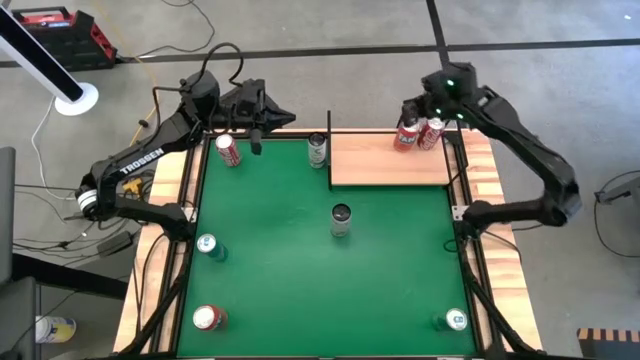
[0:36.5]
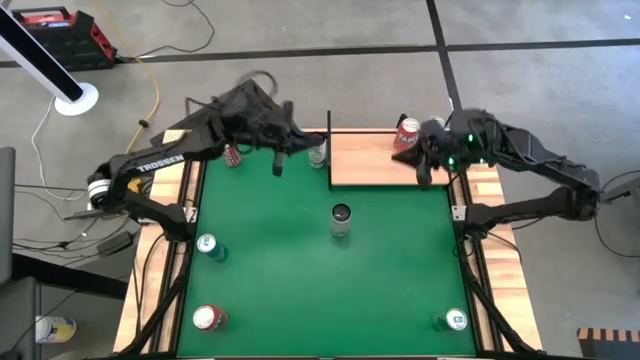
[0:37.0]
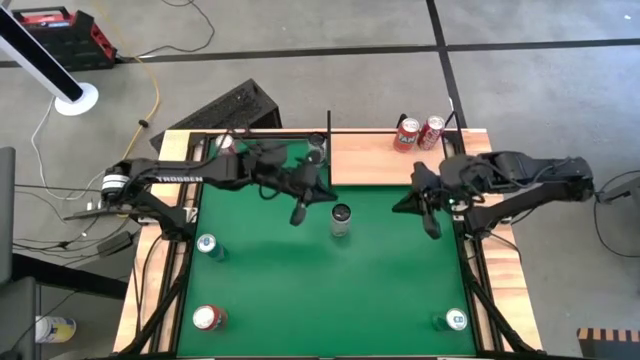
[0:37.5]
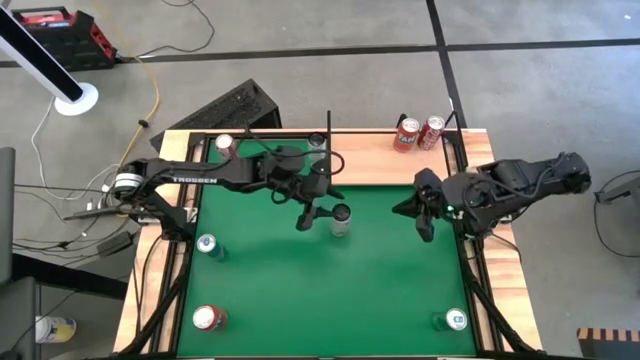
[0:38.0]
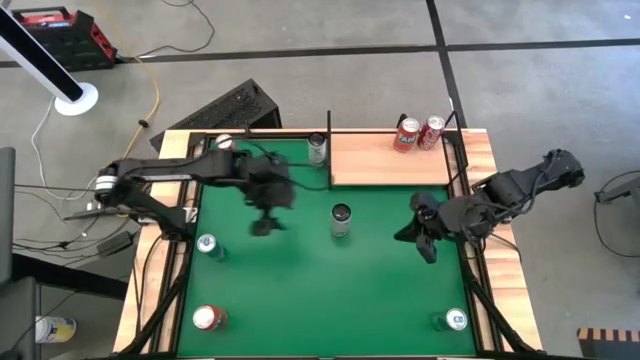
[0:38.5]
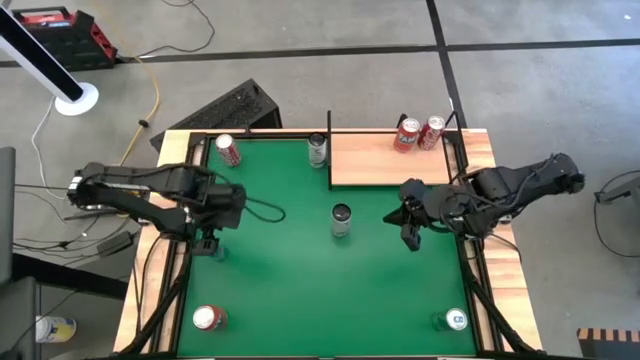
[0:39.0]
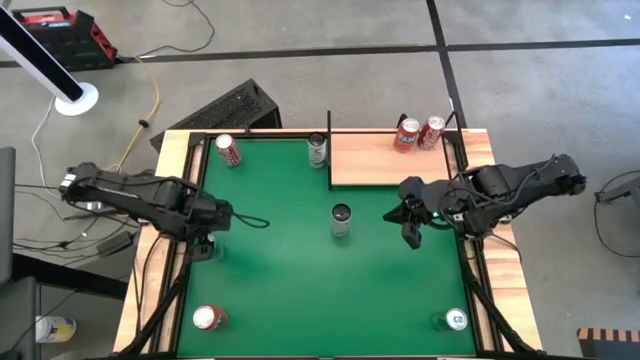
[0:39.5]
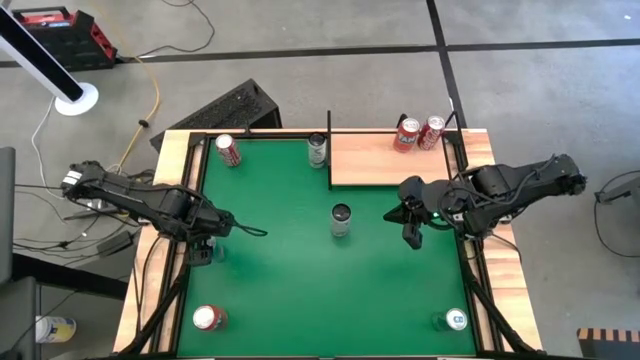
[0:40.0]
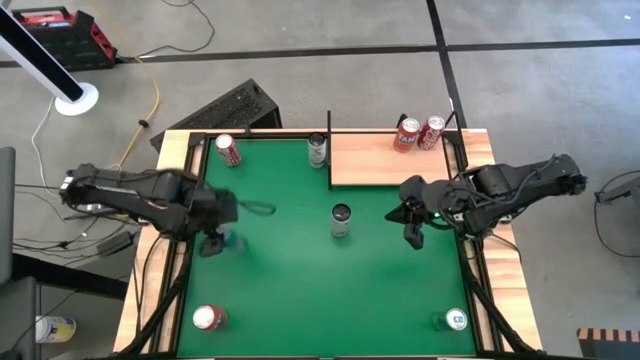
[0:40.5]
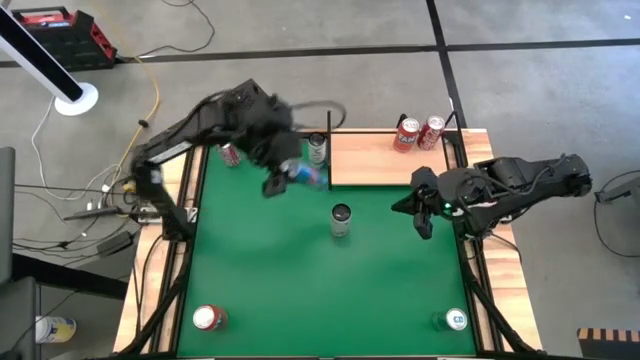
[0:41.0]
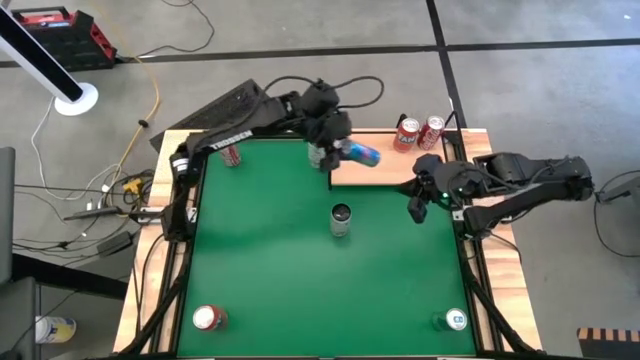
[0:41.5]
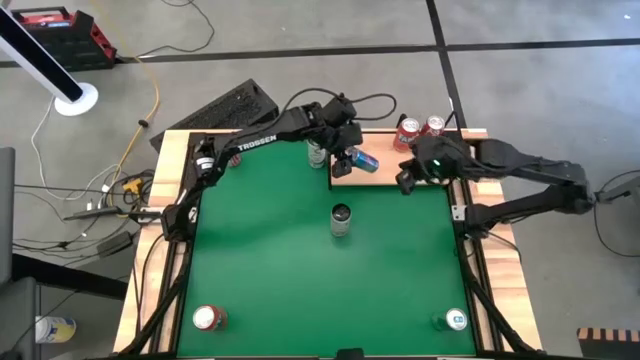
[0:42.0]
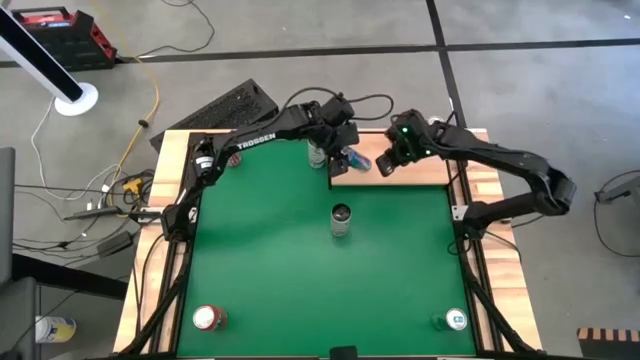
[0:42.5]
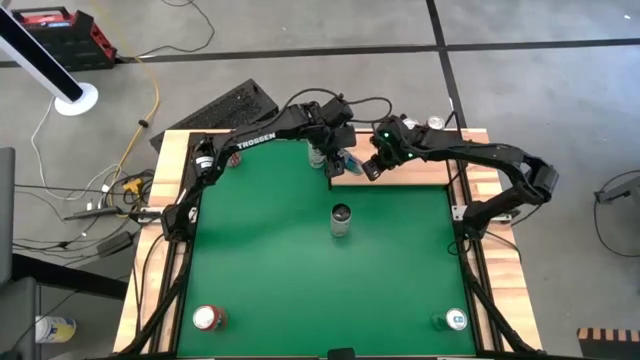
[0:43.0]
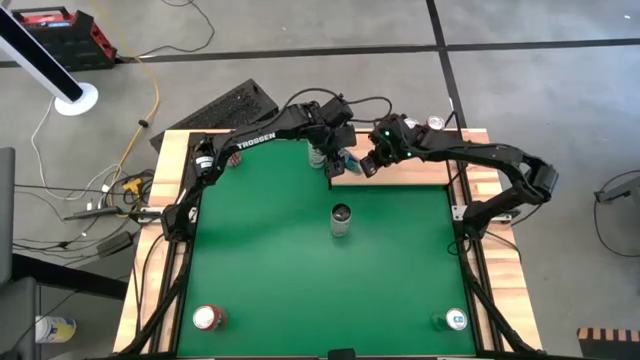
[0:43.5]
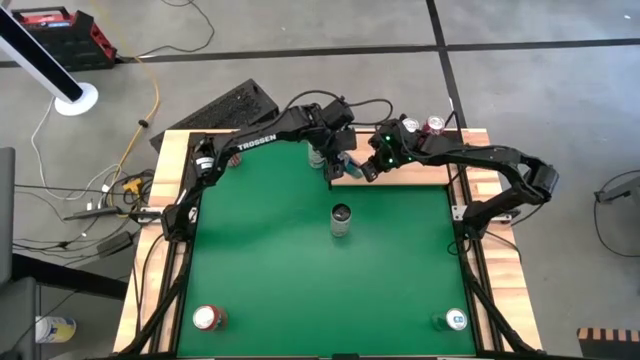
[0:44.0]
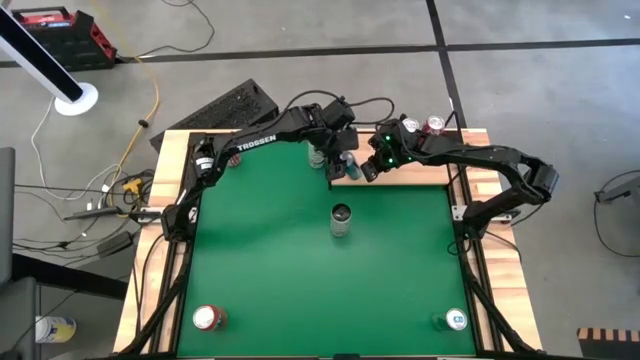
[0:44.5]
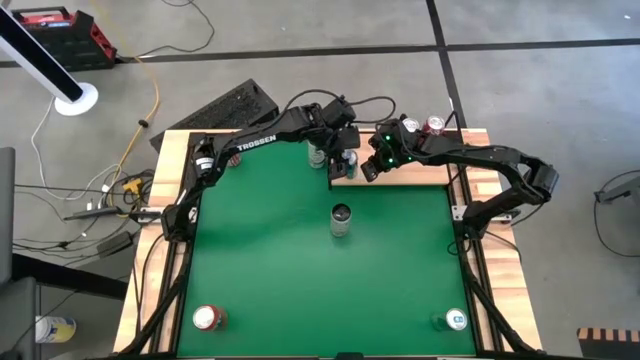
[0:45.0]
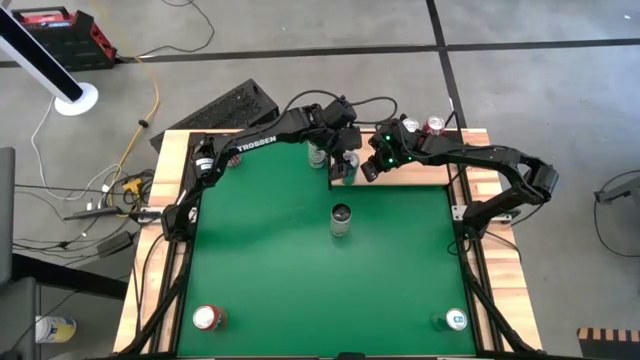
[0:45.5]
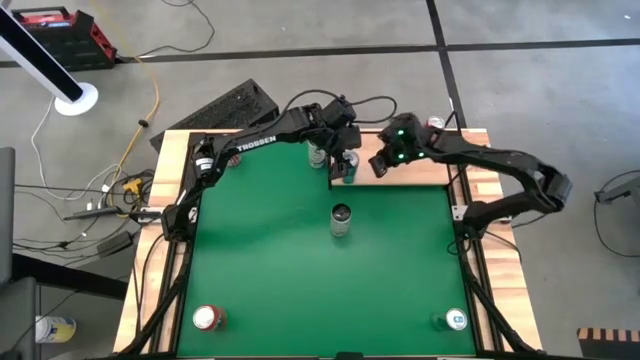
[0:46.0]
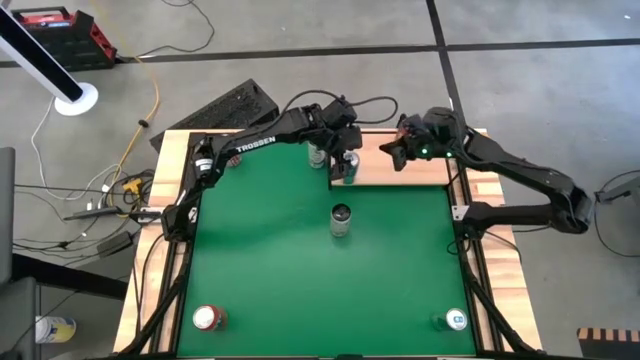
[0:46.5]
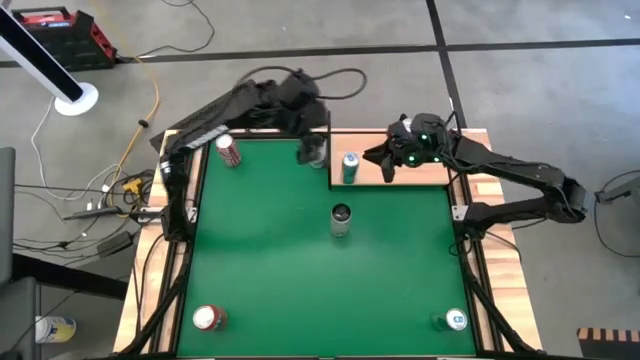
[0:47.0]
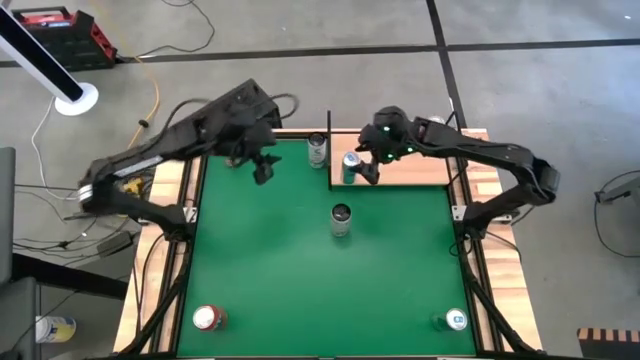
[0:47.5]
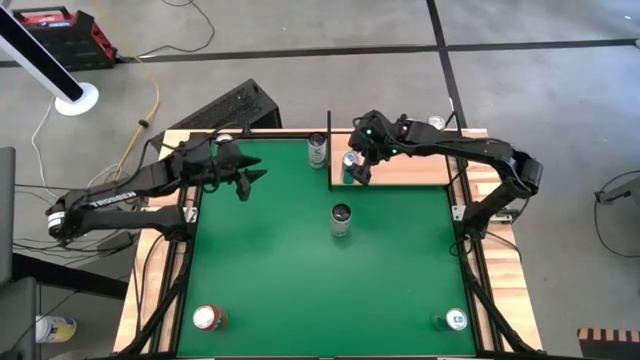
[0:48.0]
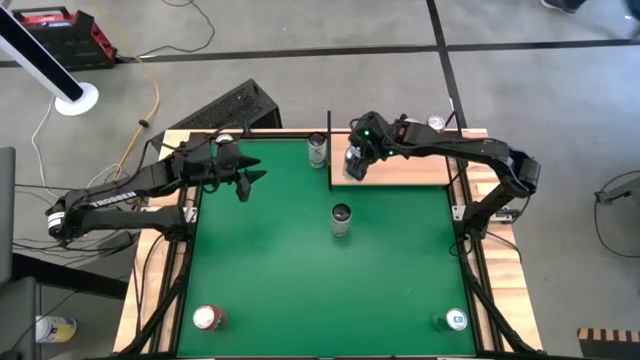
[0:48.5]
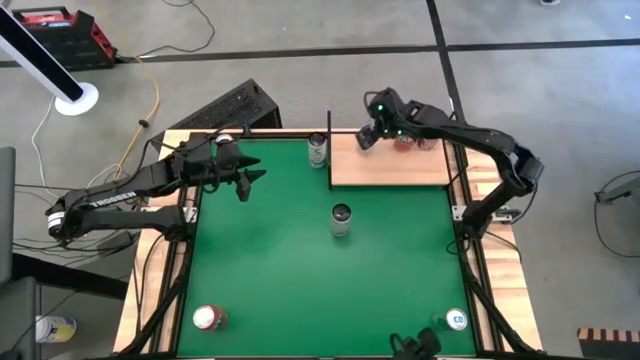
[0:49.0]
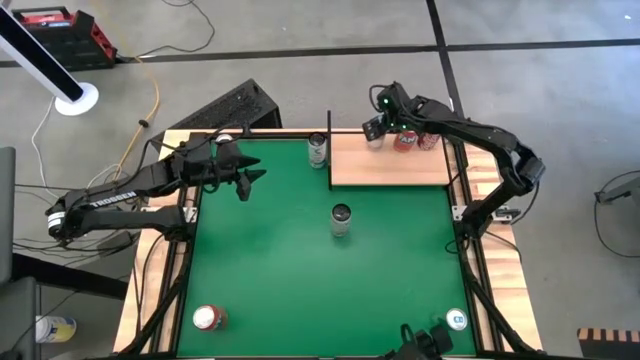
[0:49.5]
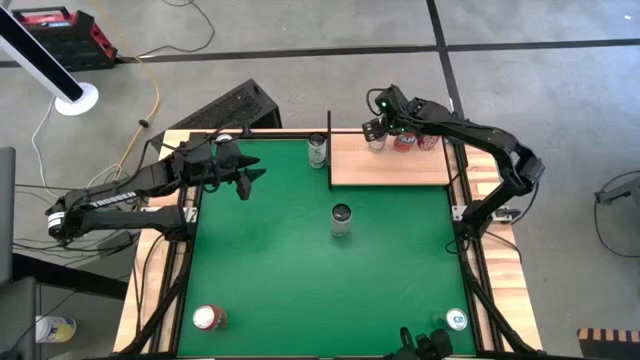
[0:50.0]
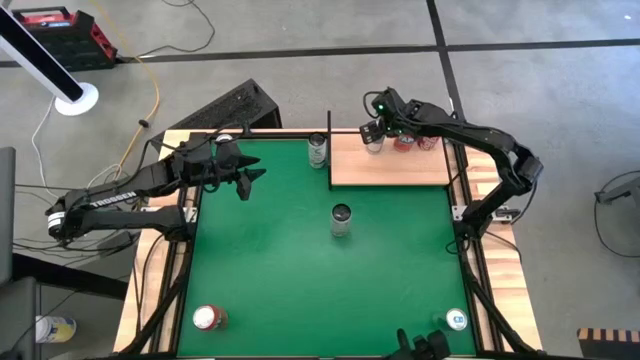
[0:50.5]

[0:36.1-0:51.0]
Task: Place canned beverage on shelf
Put the top blue soda can on the shelf
